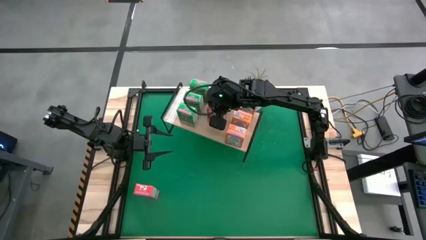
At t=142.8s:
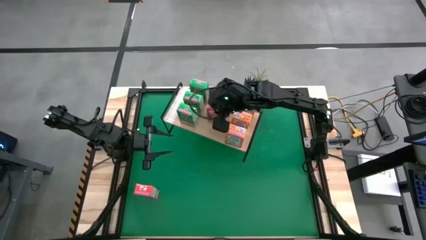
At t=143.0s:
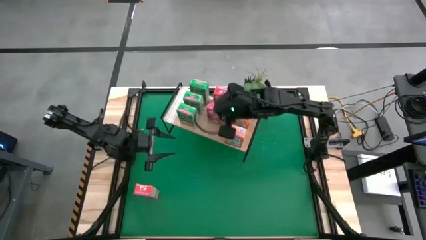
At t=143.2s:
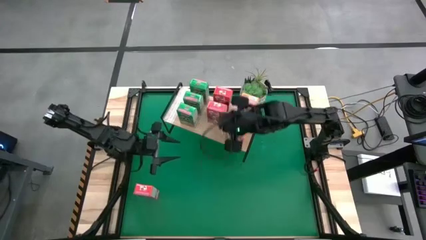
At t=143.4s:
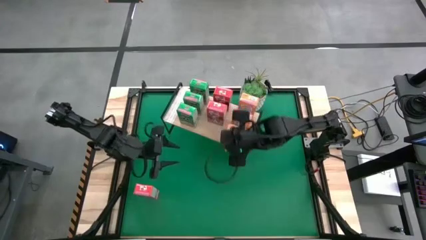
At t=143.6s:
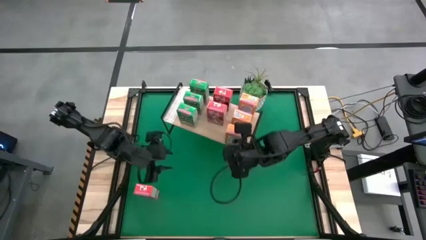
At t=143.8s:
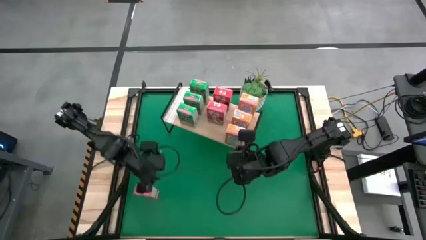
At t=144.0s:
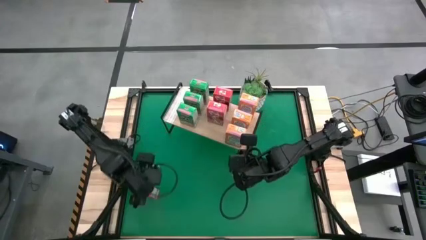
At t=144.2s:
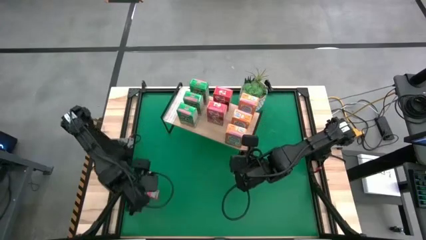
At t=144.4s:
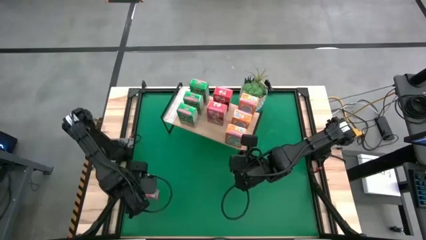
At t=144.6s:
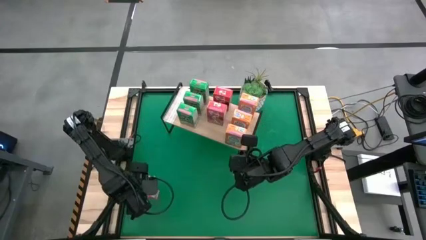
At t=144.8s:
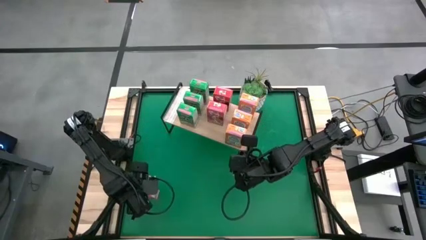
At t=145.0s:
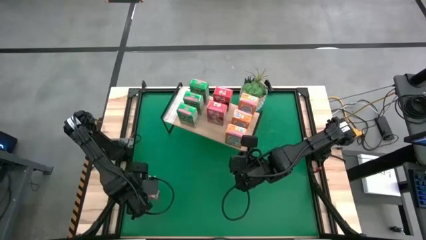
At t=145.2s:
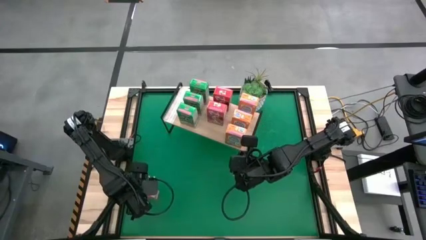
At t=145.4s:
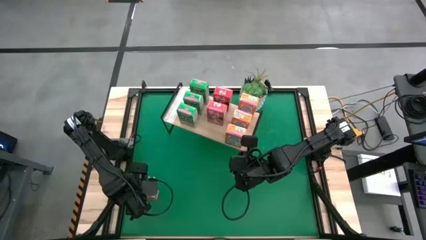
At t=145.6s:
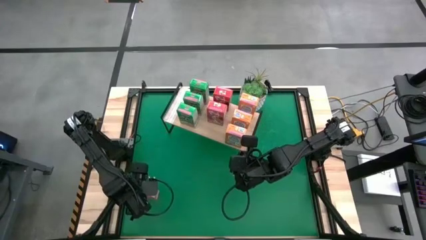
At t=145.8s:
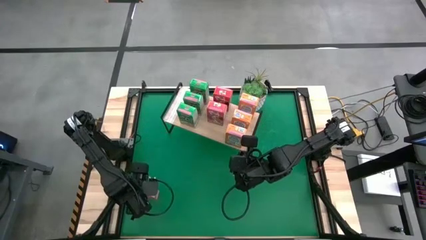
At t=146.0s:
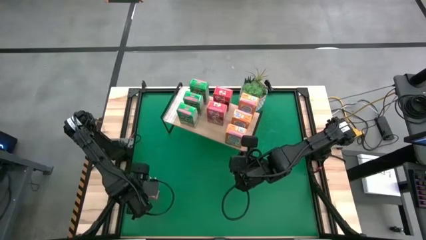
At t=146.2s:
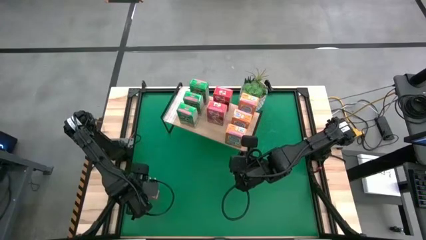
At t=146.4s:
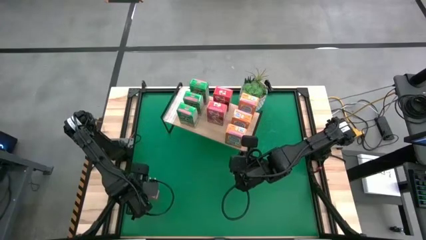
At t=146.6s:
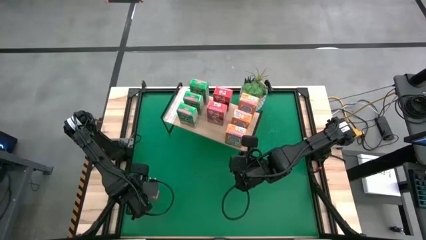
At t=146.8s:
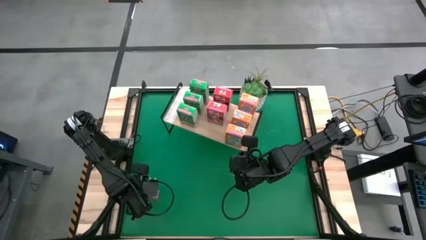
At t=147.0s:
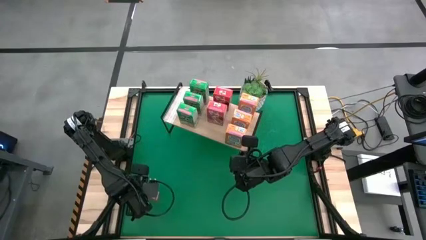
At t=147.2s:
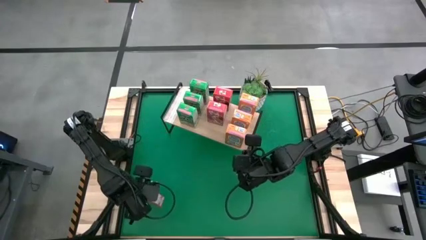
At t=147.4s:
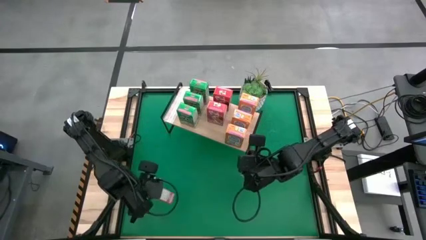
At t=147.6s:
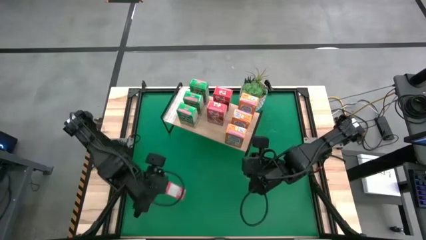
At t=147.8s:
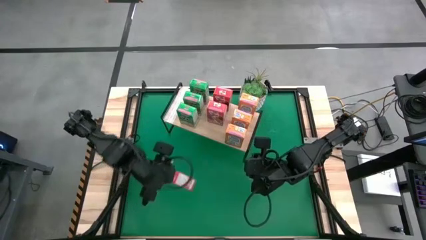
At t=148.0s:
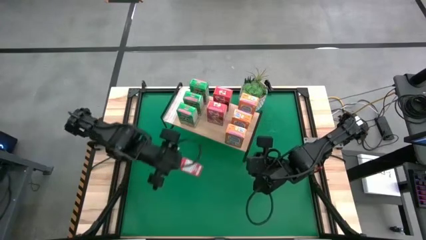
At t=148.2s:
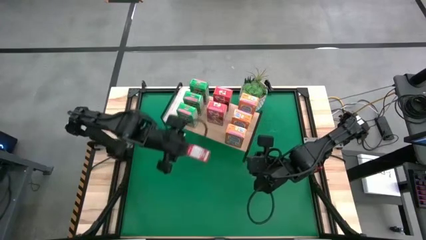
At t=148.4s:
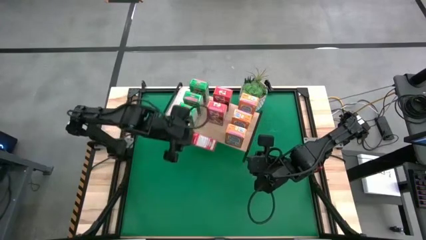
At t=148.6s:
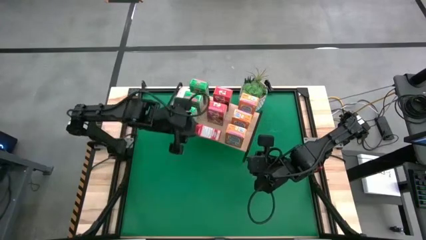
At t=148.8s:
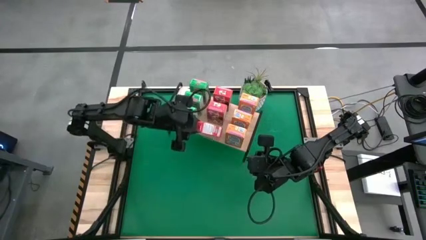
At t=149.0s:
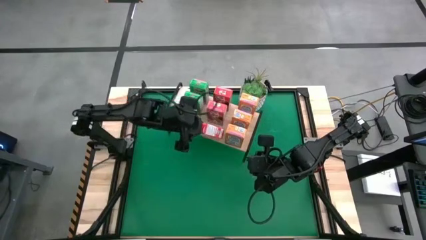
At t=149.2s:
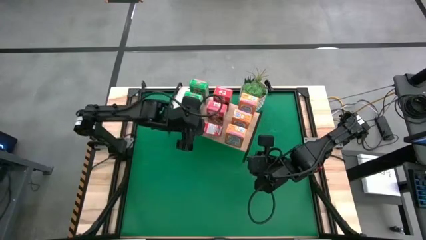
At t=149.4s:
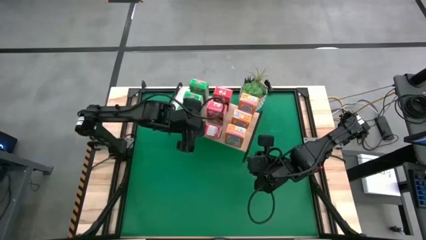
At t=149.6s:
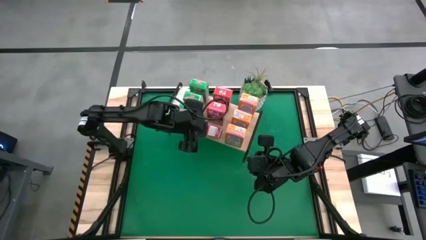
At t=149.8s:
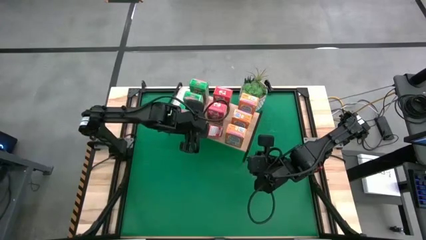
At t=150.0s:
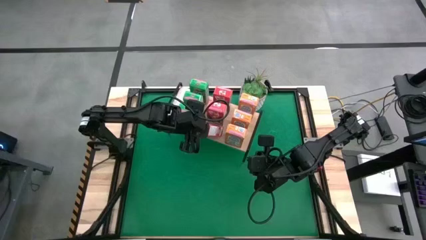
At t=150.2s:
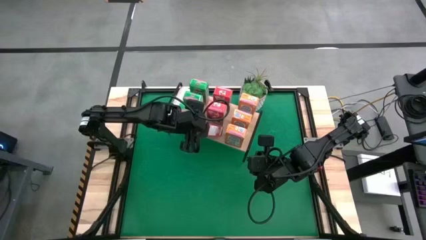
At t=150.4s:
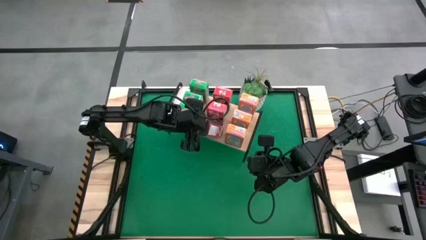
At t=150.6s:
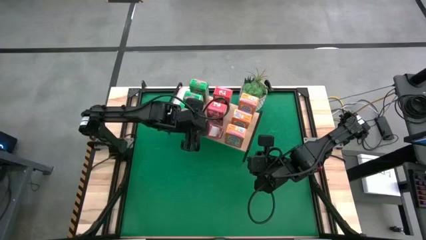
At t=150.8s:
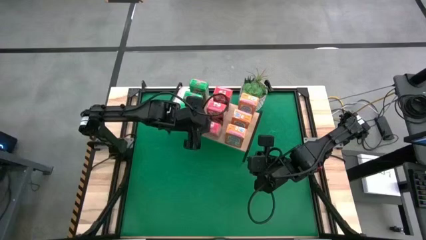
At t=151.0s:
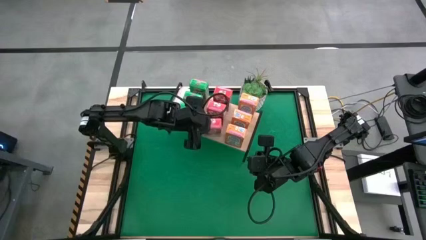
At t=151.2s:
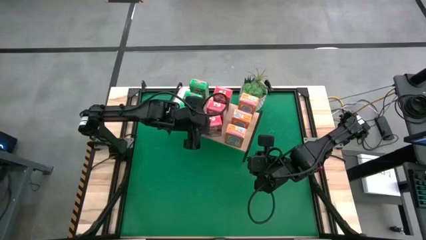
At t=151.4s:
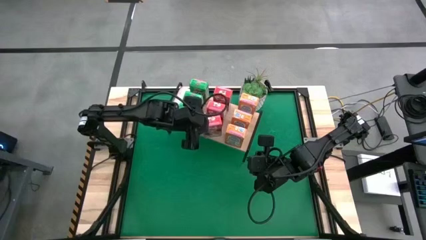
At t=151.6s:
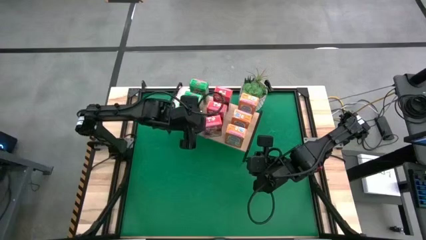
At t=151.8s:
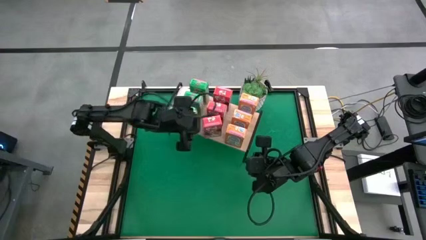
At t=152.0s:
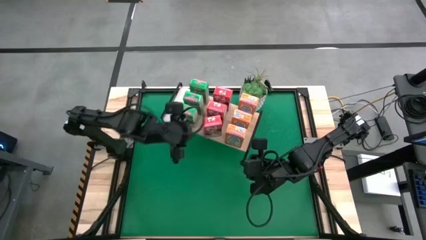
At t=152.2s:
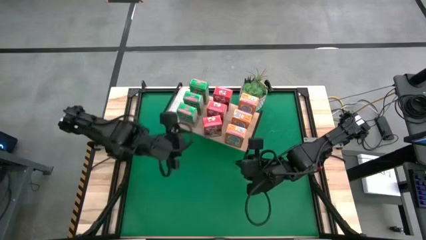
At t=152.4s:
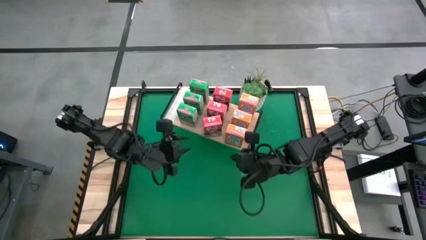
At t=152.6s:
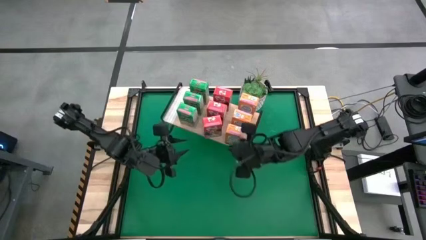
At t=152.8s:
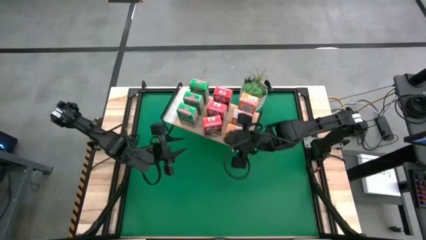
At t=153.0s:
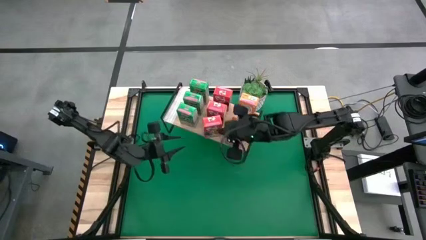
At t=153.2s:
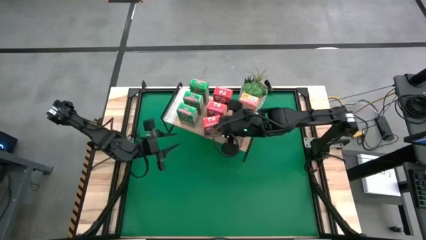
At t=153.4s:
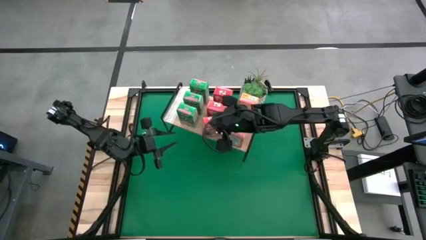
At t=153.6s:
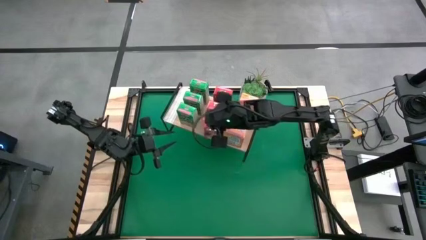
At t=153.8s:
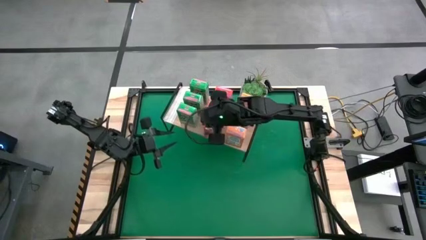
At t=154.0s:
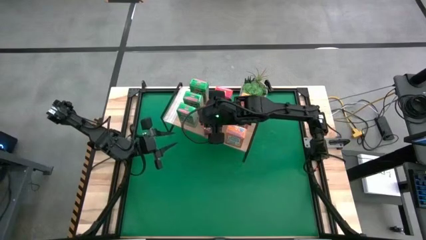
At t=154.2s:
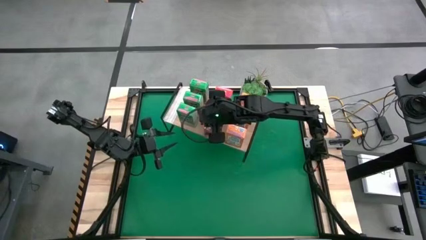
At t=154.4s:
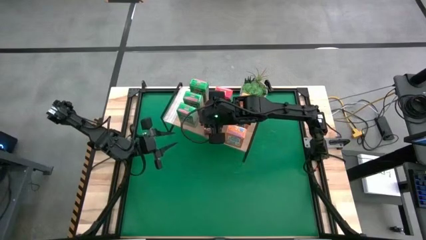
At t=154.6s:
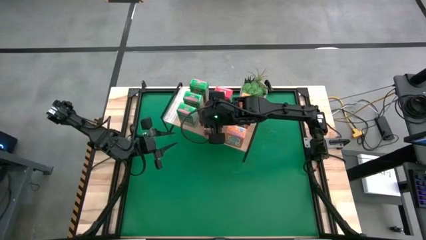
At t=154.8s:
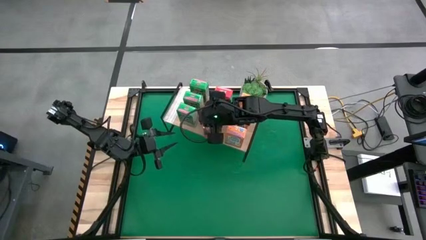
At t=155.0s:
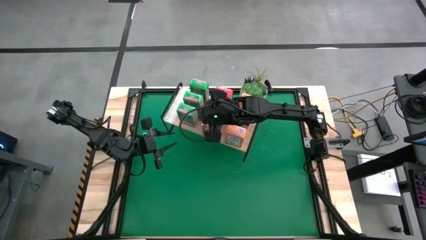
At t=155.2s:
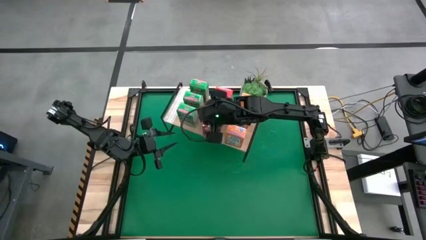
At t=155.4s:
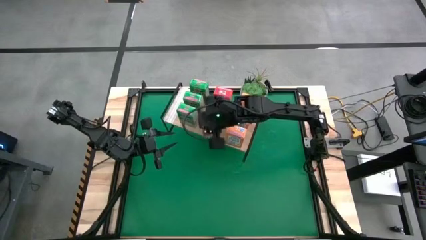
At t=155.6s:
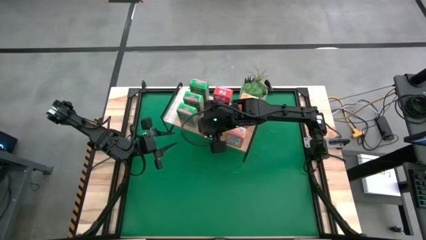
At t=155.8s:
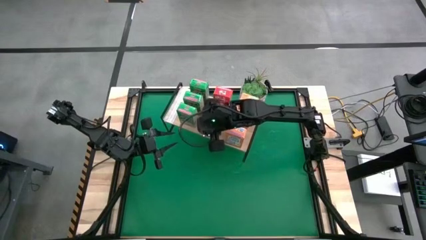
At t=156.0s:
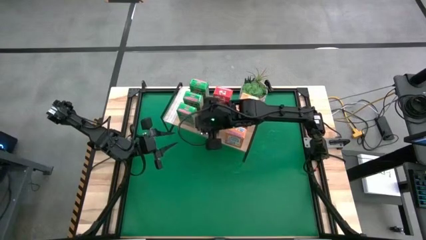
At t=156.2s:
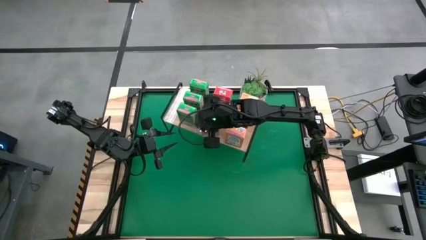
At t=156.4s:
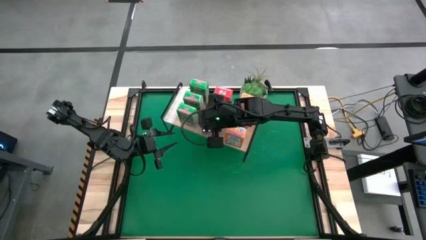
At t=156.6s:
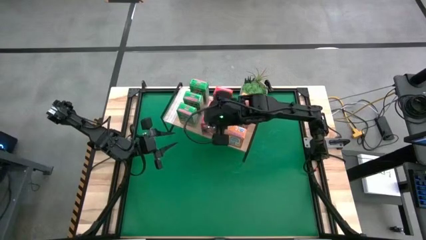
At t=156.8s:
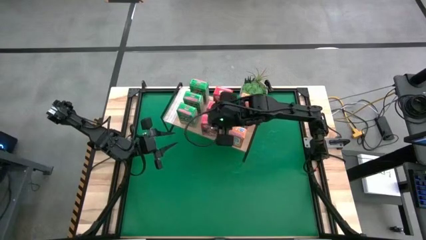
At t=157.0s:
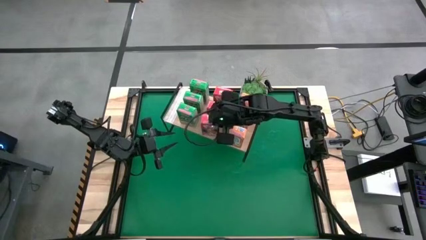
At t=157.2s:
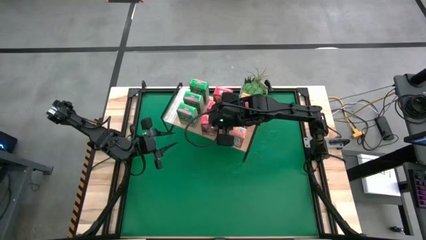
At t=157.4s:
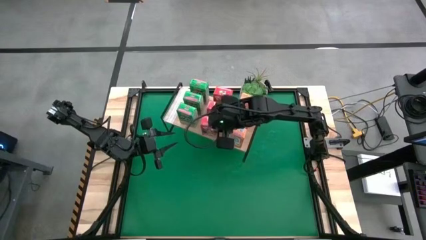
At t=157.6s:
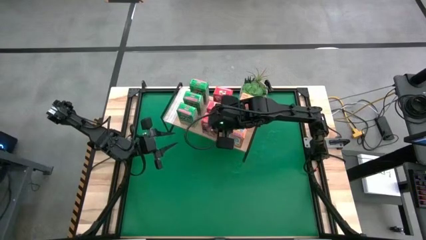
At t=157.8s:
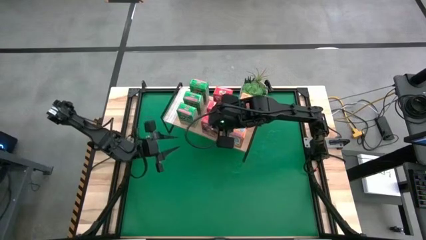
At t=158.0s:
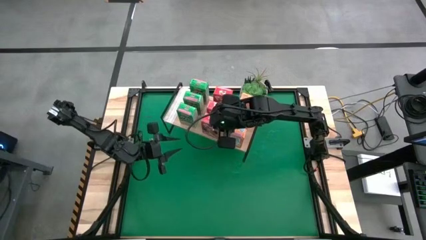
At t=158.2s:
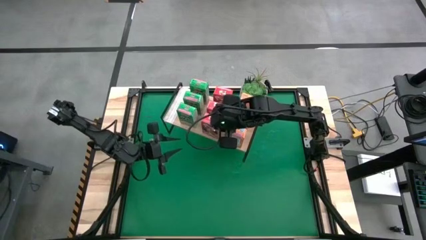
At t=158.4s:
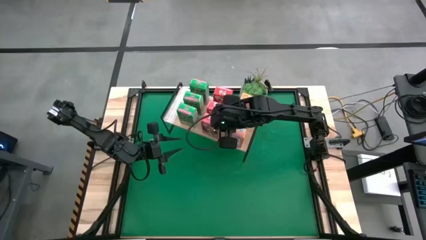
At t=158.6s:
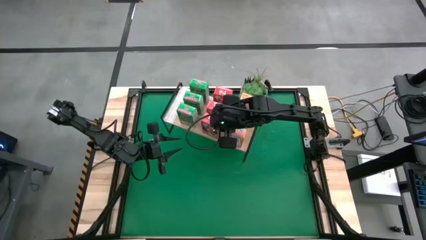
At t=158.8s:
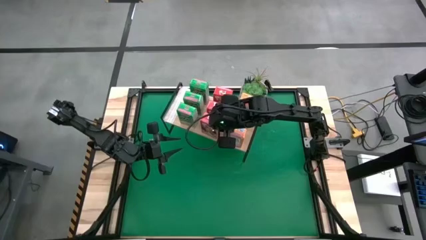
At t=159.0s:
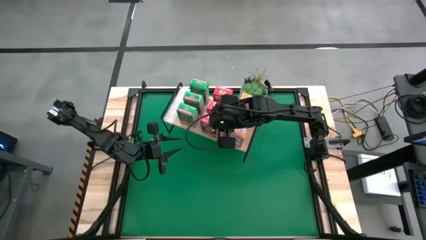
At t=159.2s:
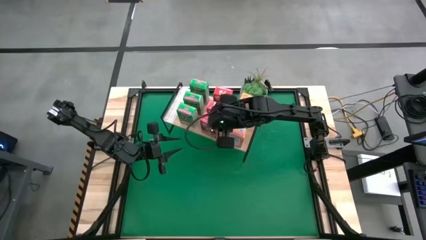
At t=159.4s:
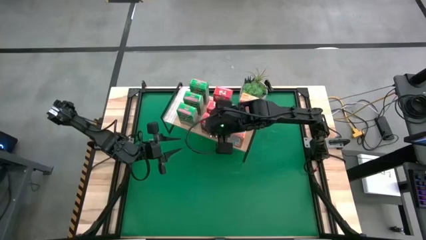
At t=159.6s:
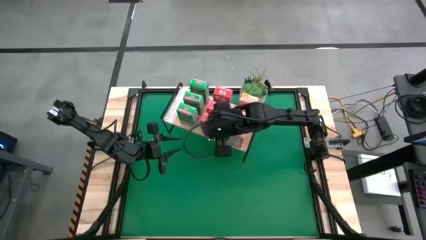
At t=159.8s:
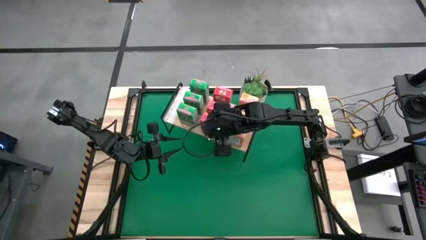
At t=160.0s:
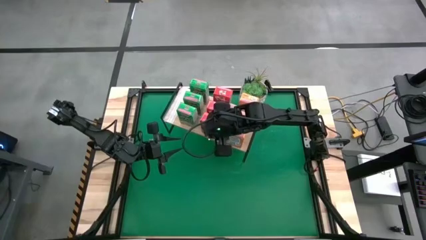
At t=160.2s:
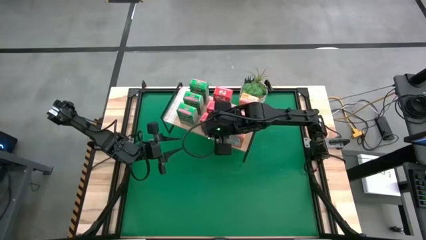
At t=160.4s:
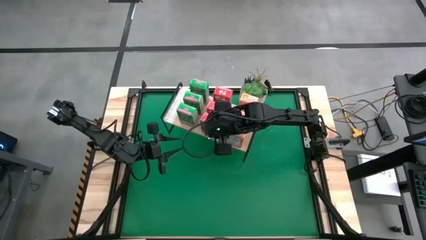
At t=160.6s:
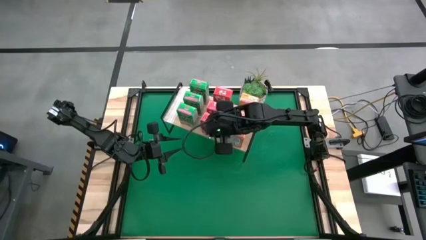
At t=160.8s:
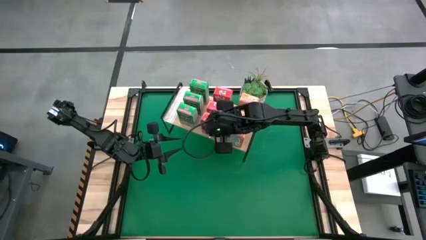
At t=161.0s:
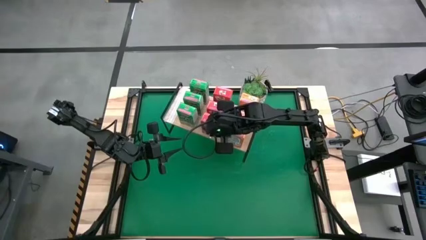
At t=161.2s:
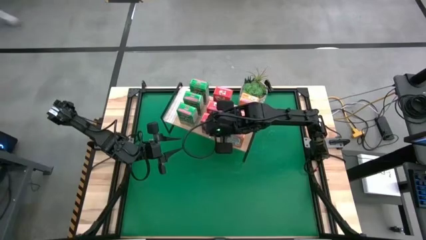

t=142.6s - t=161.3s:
Task: Stack cereal on shelf
Put the red cereal box aligned with the other red cereal boxes on the shelf
